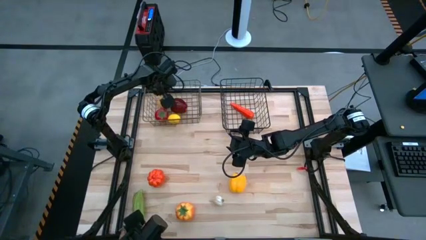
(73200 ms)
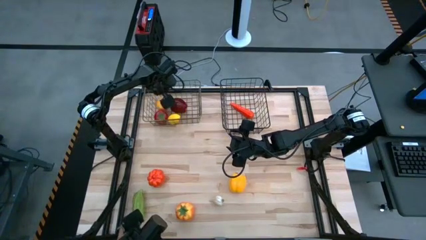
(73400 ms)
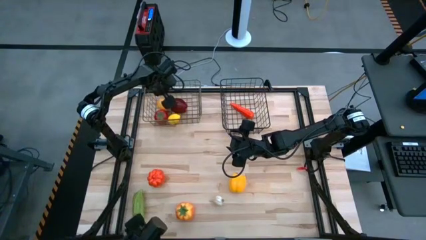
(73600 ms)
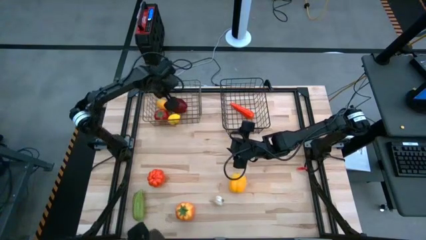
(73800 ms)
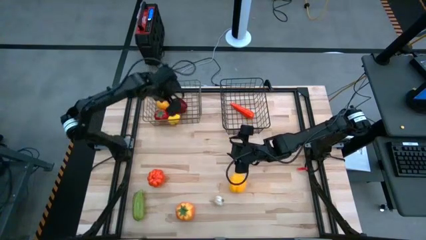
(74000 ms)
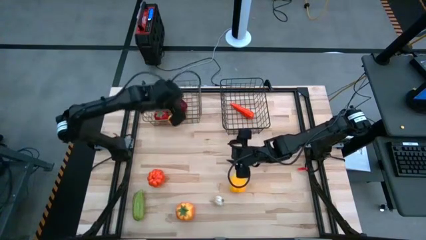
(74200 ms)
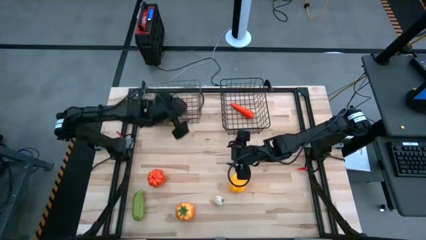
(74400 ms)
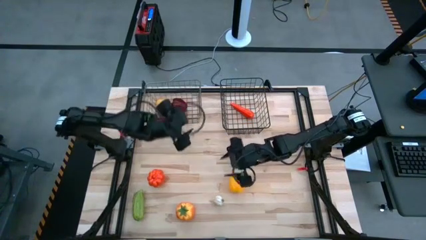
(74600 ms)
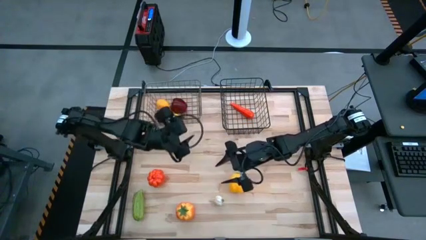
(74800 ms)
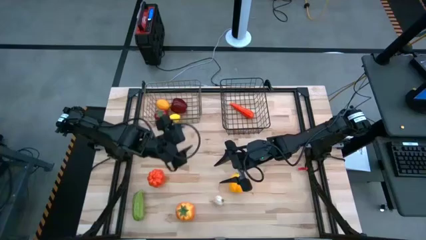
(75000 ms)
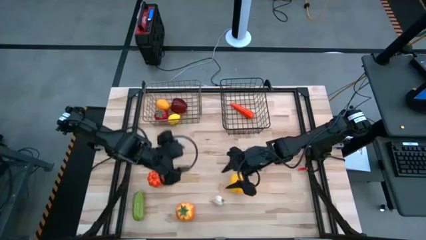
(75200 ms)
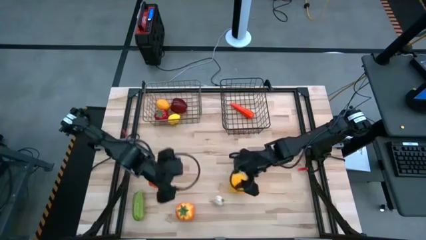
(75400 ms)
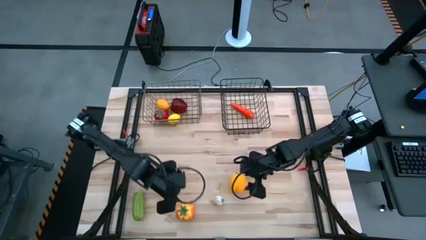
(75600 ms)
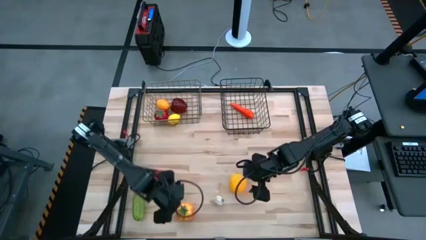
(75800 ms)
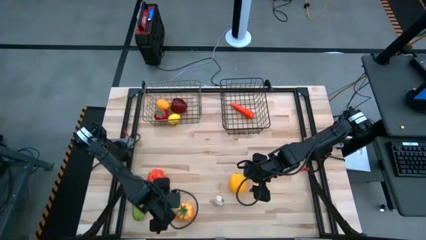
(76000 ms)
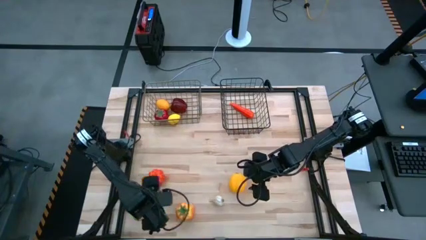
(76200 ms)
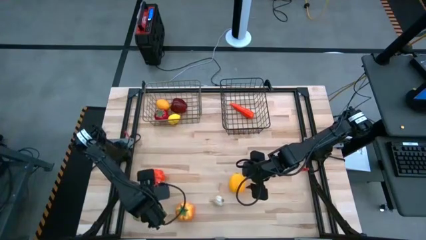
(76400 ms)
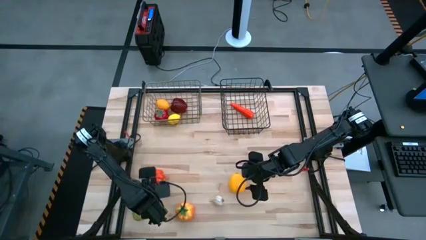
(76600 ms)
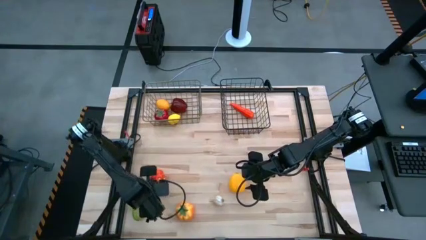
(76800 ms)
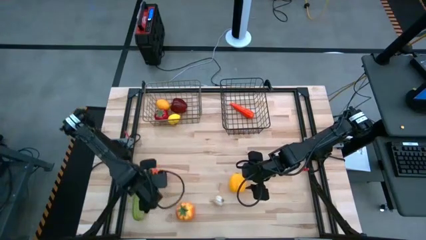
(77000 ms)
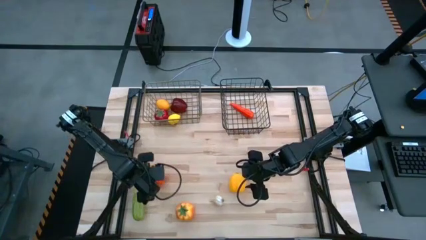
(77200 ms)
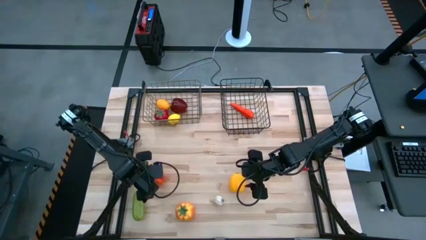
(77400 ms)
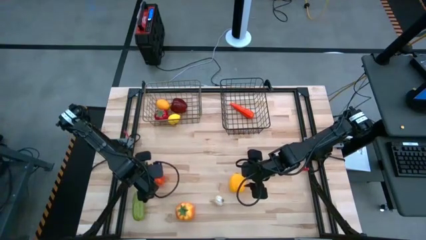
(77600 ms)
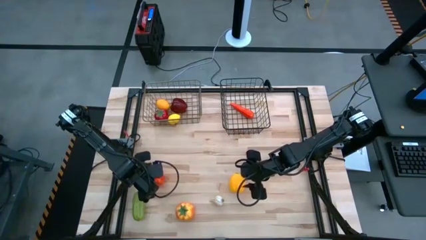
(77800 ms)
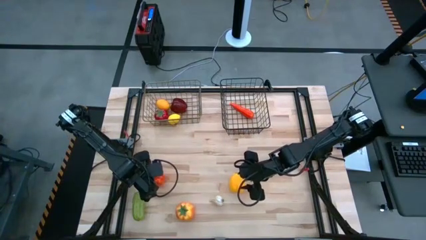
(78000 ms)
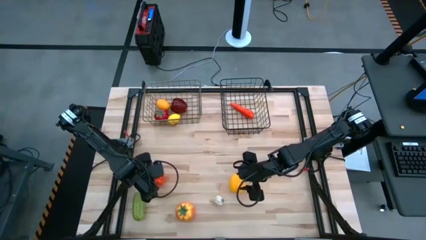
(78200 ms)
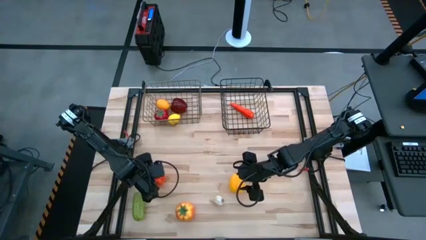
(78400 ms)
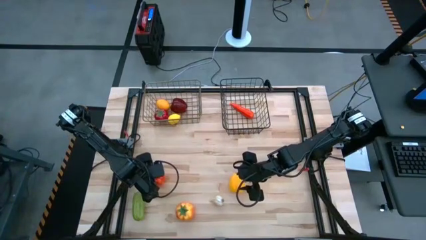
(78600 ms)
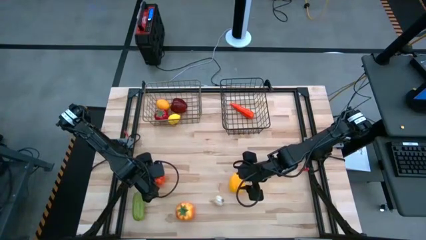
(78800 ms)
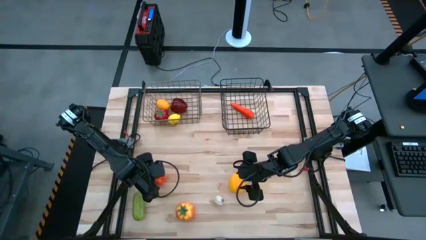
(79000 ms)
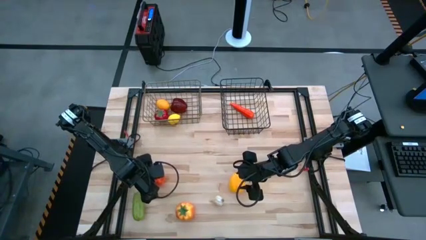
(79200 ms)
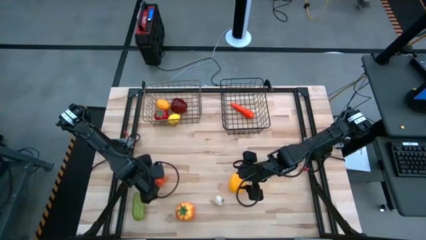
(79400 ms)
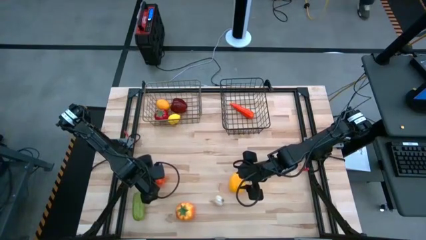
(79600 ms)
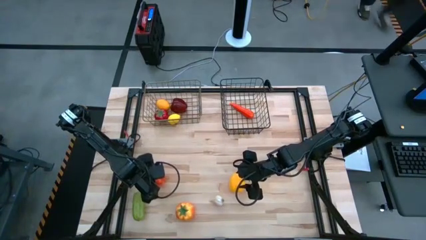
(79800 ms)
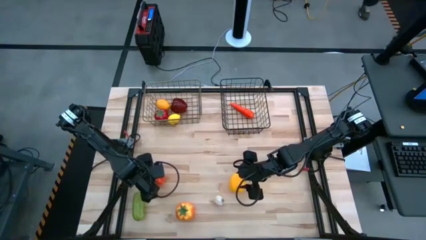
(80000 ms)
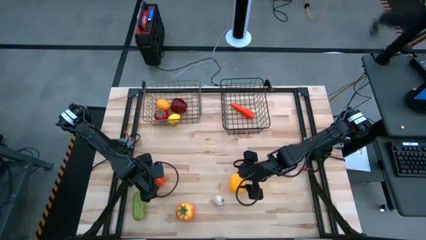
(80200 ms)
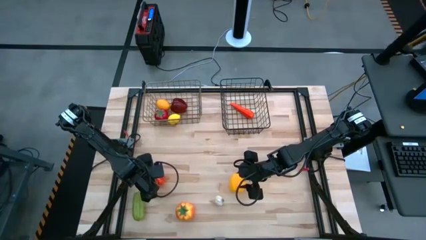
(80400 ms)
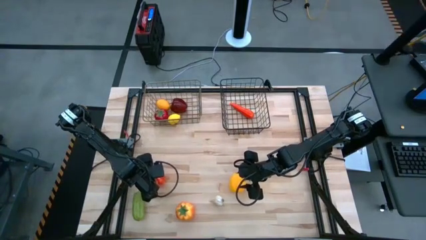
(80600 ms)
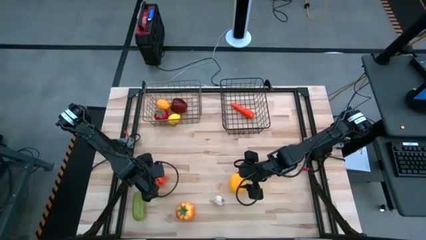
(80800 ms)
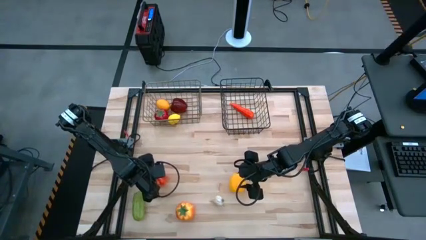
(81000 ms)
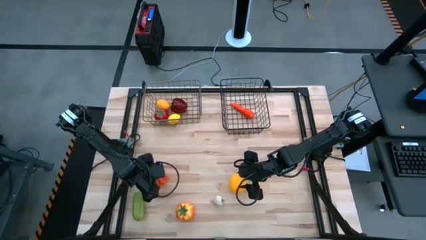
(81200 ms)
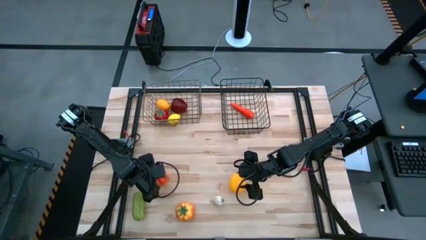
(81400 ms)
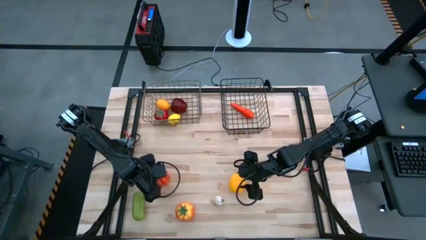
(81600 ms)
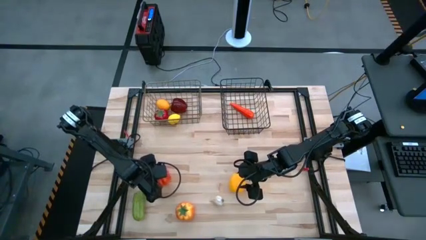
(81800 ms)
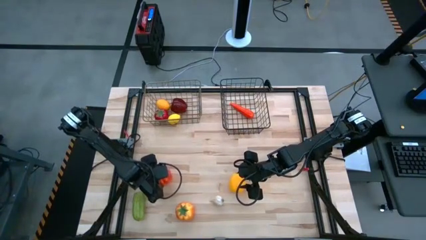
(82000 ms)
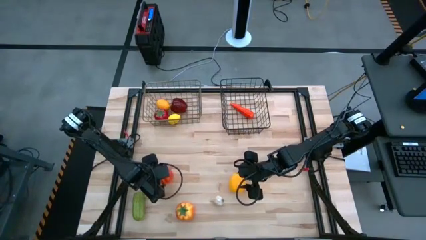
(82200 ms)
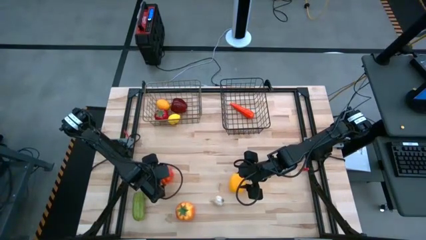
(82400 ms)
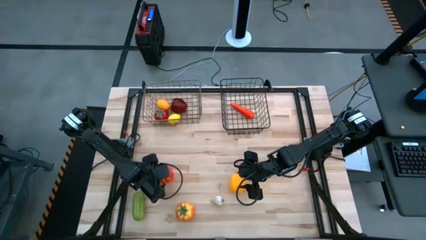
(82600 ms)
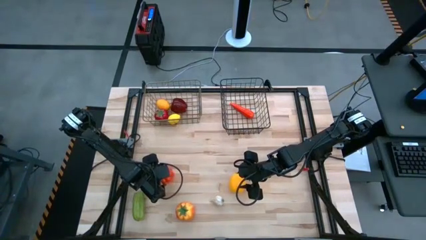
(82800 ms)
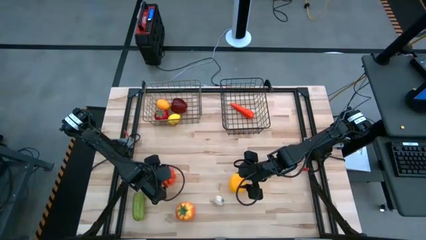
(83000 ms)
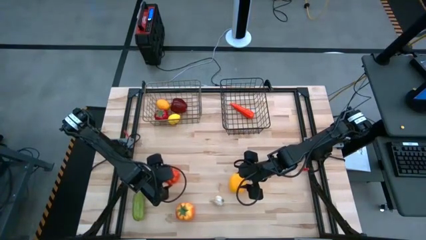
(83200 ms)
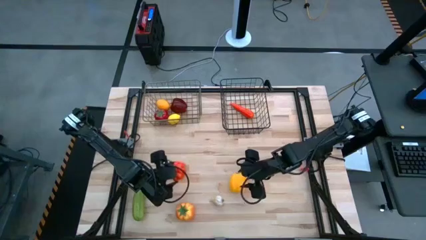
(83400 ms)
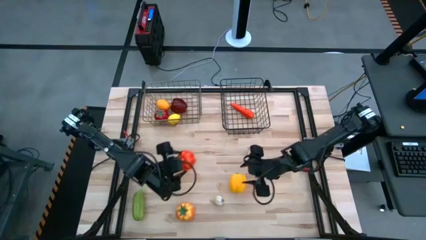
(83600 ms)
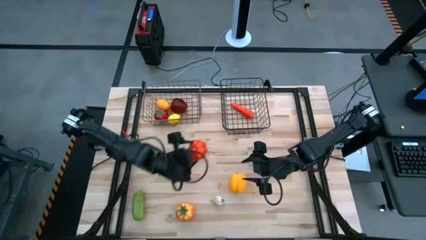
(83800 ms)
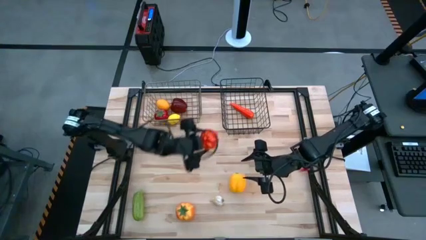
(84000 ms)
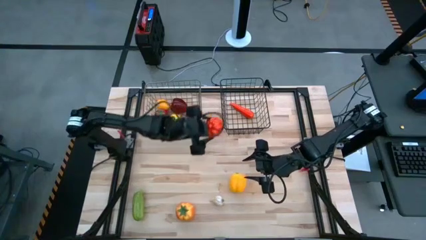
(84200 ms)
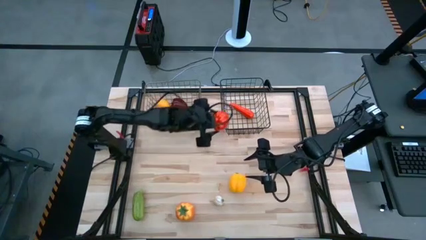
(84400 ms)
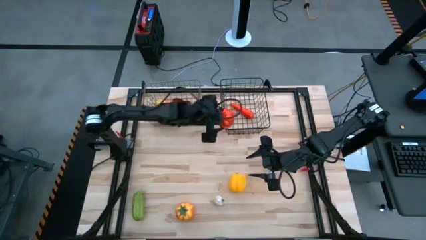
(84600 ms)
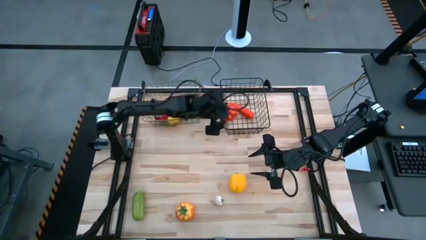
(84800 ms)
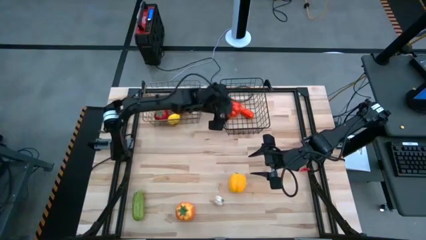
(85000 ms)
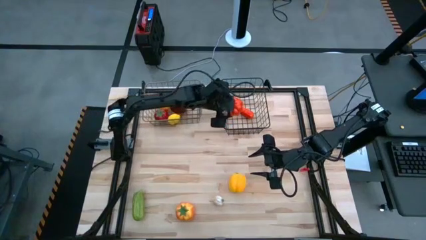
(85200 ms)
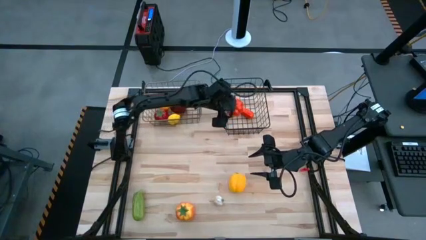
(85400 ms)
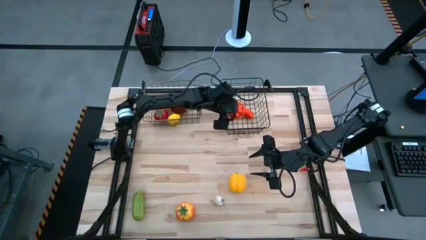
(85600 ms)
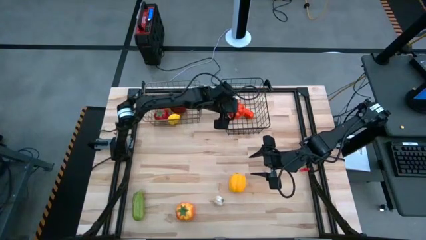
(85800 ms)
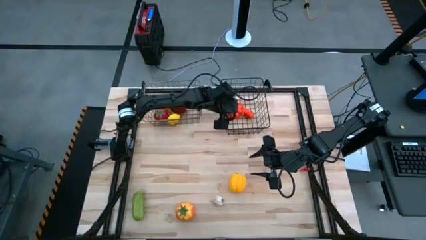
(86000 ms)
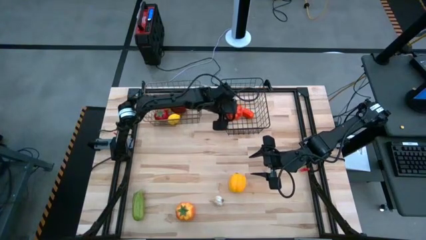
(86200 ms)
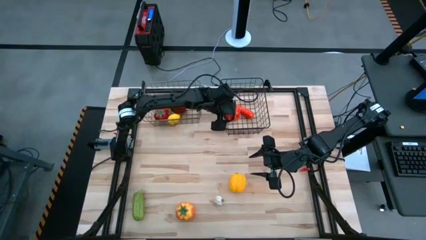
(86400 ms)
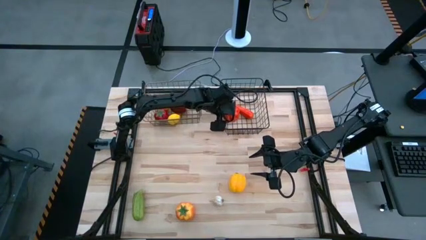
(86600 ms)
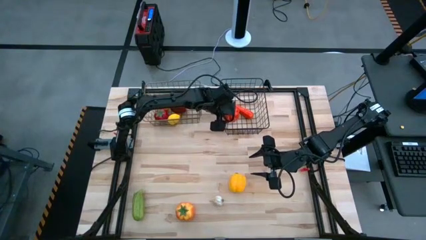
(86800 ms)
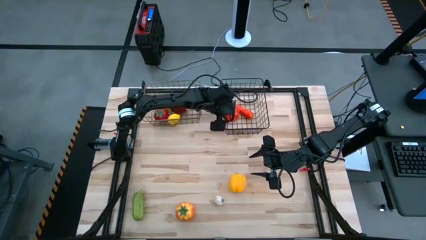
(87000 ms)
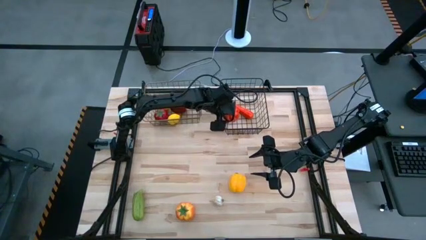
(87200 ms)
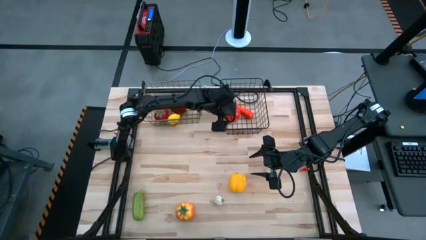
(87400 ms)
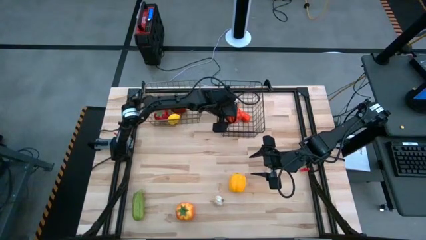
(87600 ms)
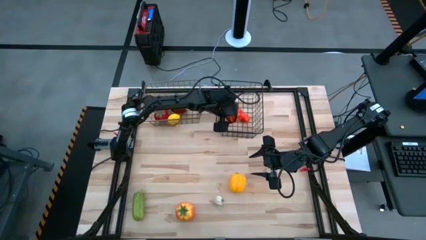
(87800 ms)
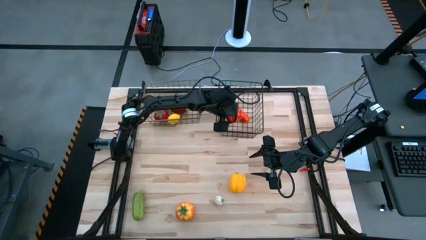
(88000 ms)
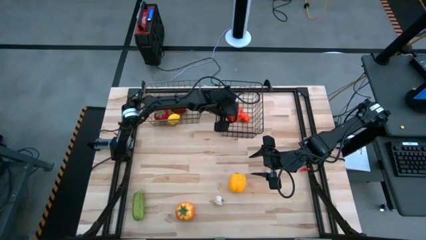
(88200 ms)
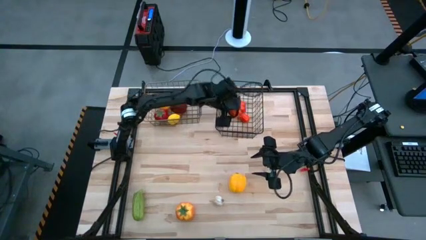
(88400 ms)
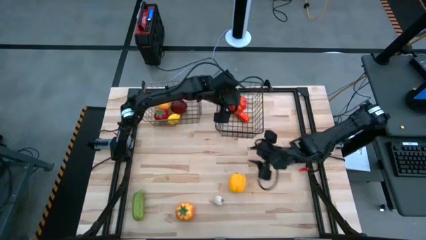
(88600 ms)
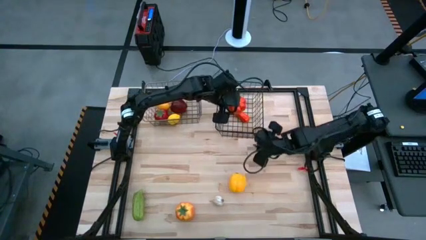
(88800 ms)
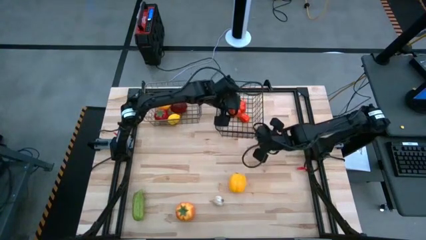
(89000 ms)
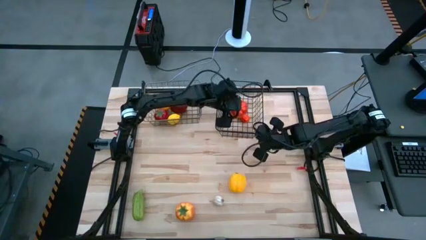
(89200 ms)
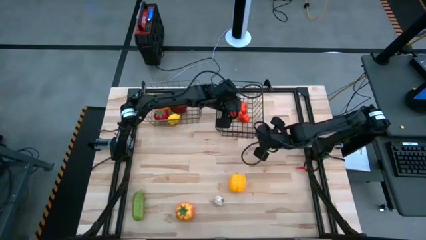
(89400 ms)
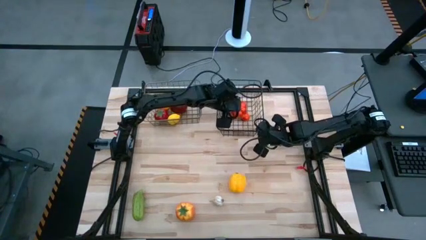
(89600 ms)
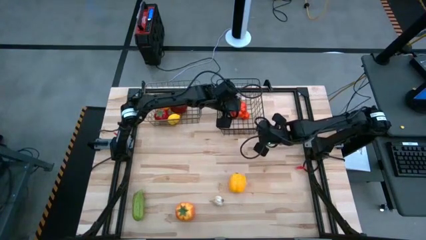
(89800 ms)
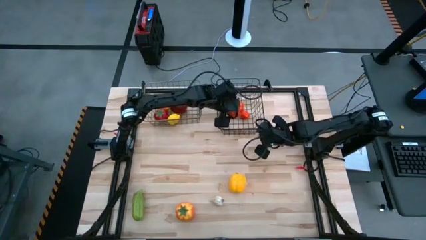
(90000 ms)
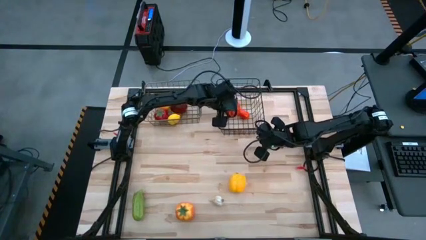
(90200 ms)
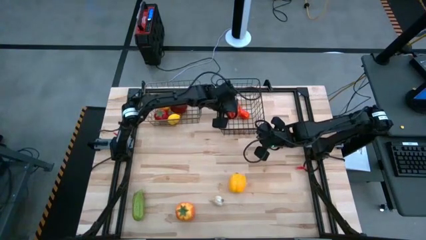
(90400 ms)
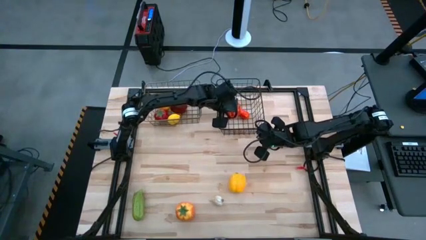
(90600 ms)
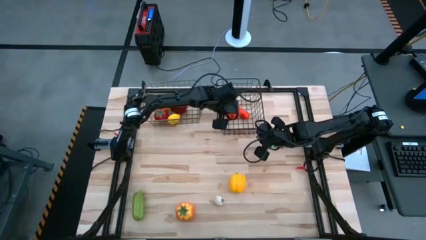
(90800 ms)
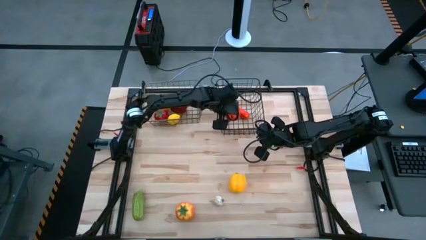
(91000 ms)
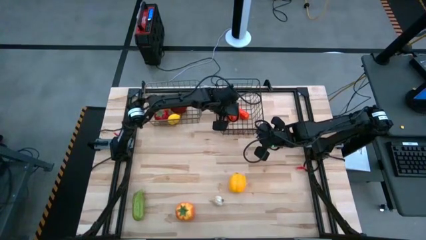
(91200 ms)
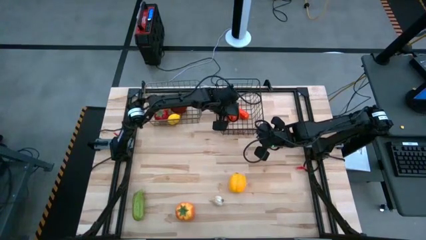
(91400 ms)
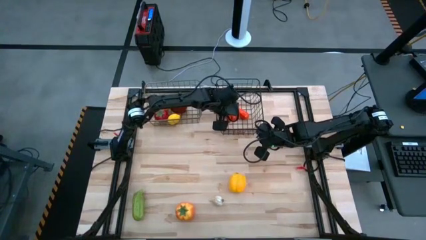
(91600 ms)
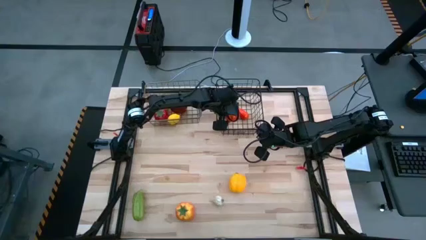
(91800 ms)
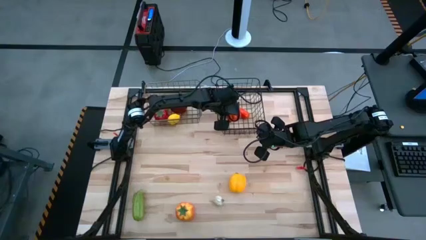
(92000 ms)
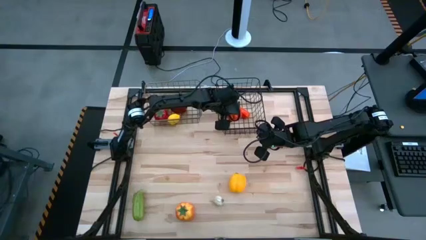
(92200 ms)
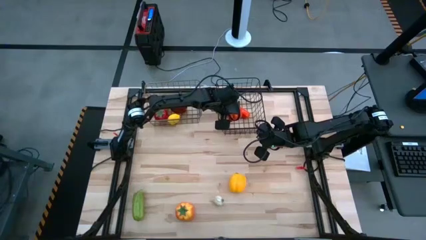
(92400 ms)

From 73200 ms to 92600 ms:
Task: Sort produce into baskets
Put the pumpkin into the black wire basket
